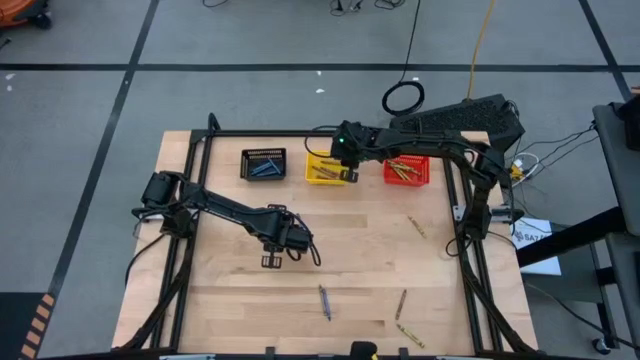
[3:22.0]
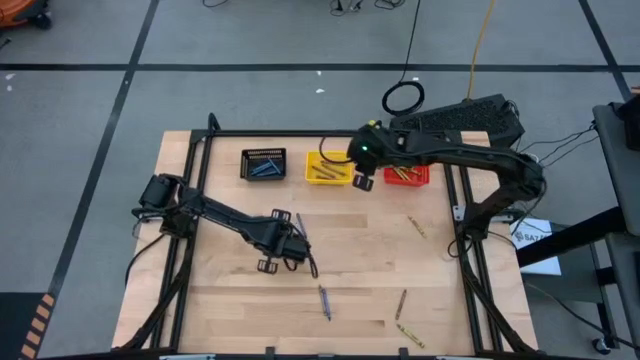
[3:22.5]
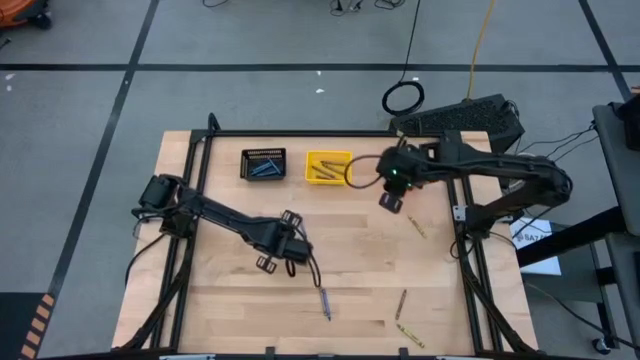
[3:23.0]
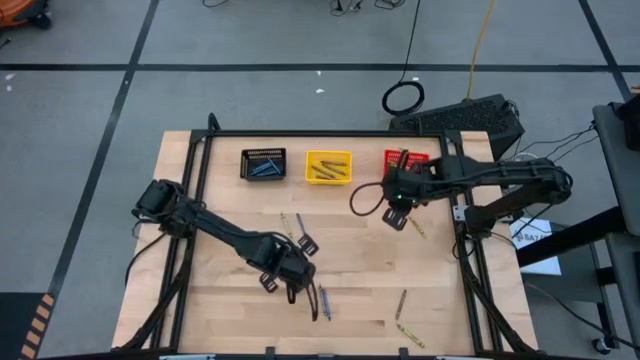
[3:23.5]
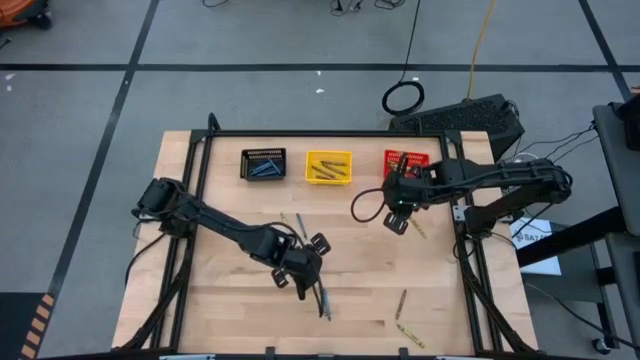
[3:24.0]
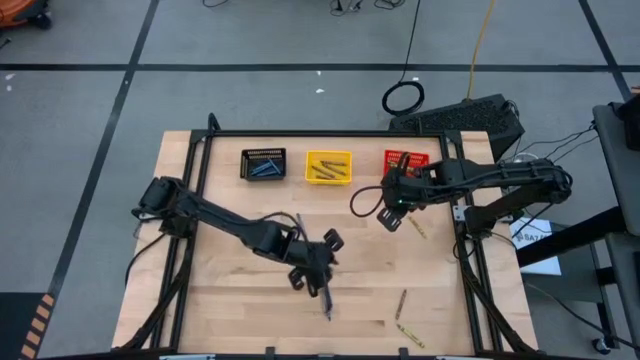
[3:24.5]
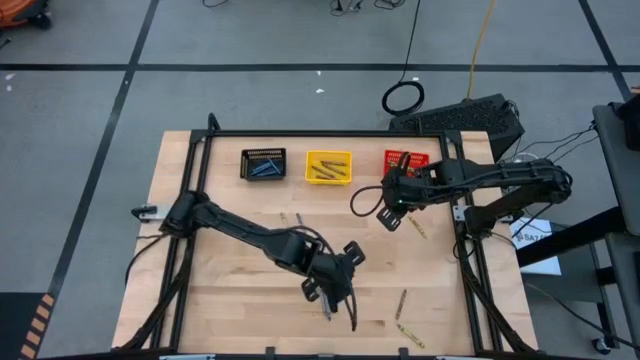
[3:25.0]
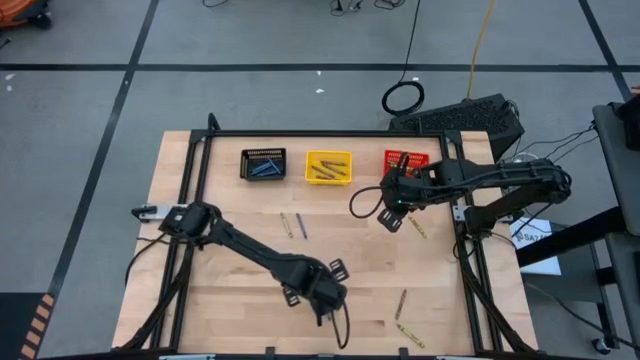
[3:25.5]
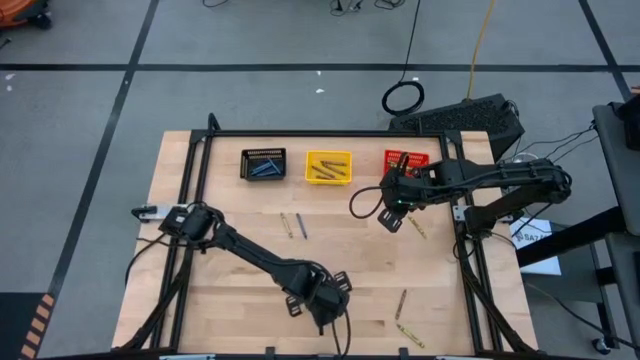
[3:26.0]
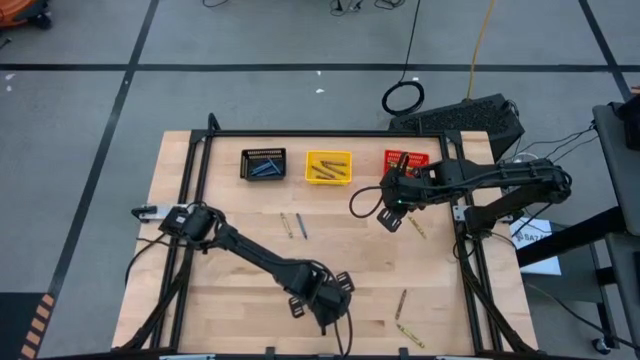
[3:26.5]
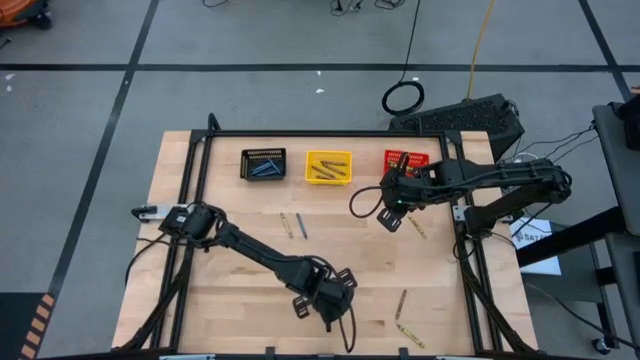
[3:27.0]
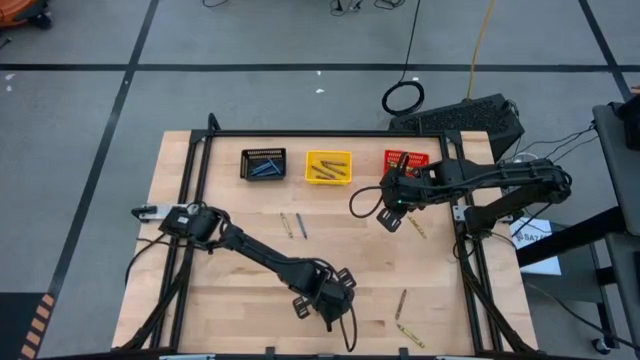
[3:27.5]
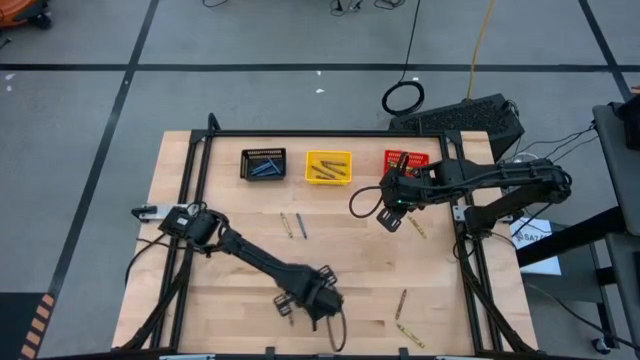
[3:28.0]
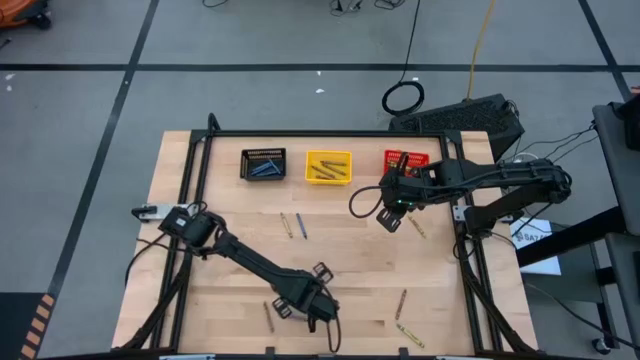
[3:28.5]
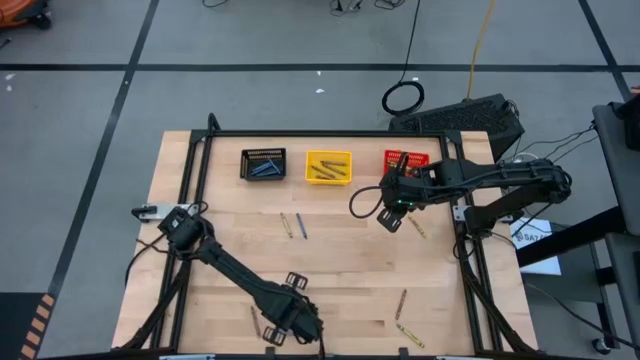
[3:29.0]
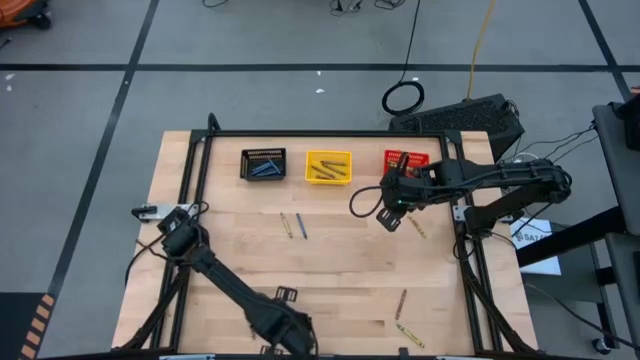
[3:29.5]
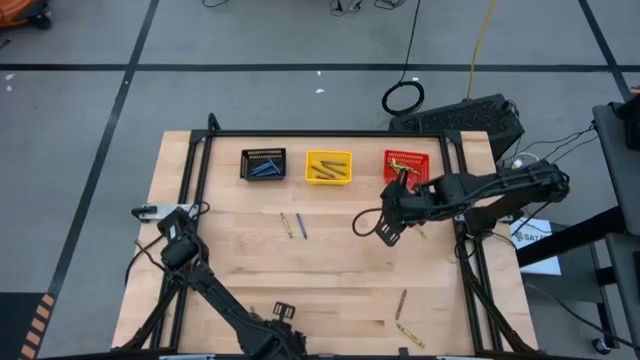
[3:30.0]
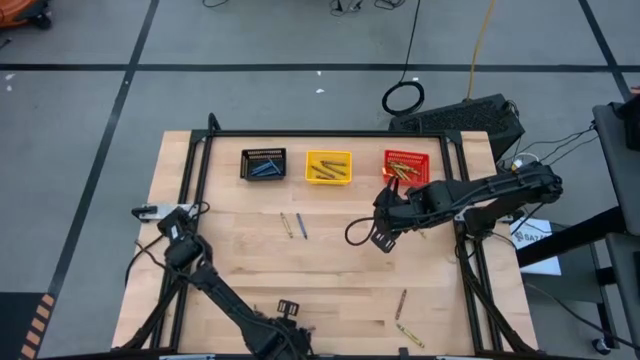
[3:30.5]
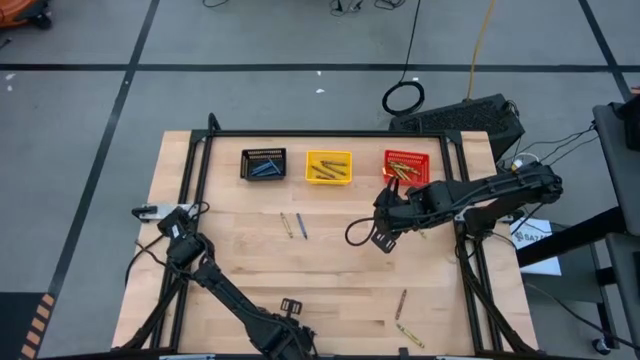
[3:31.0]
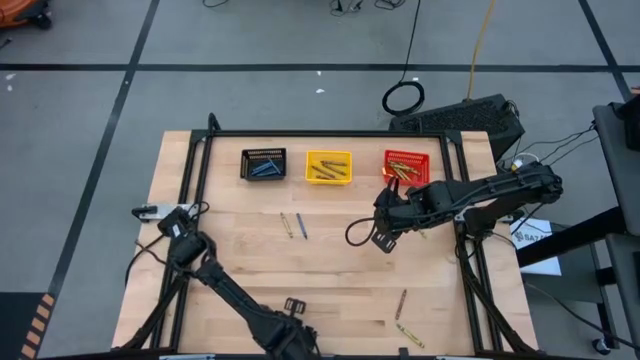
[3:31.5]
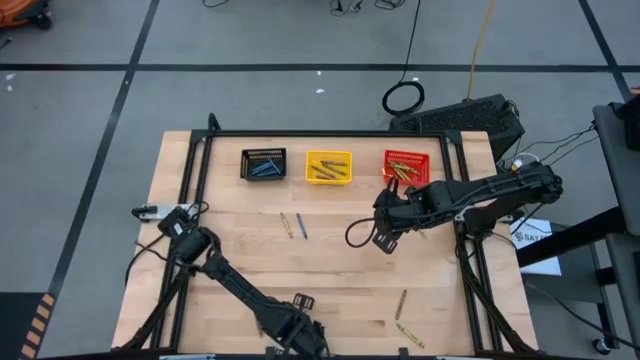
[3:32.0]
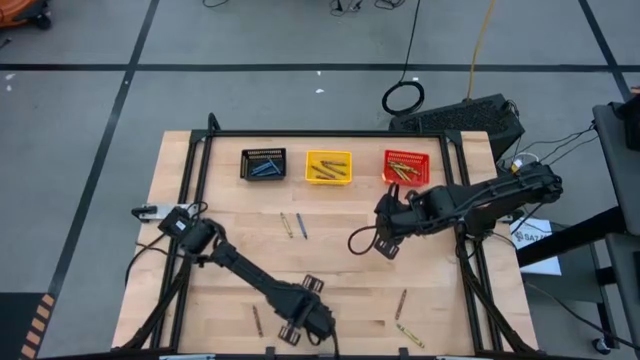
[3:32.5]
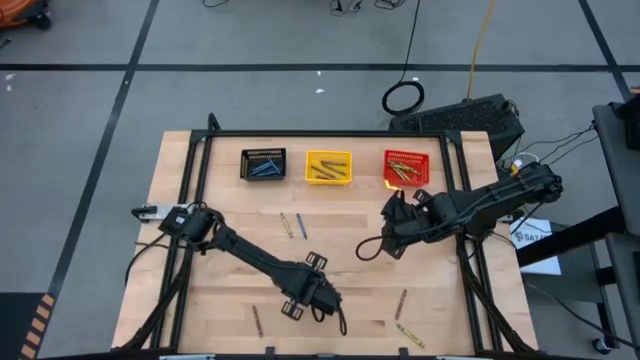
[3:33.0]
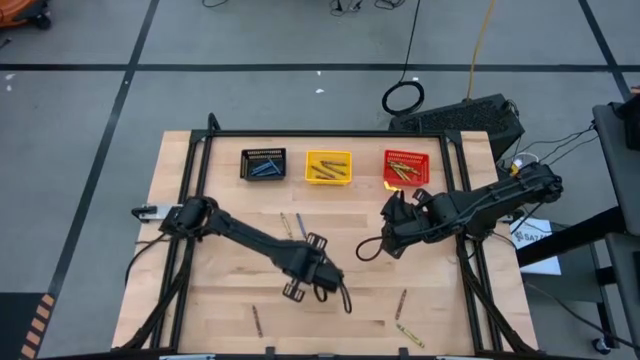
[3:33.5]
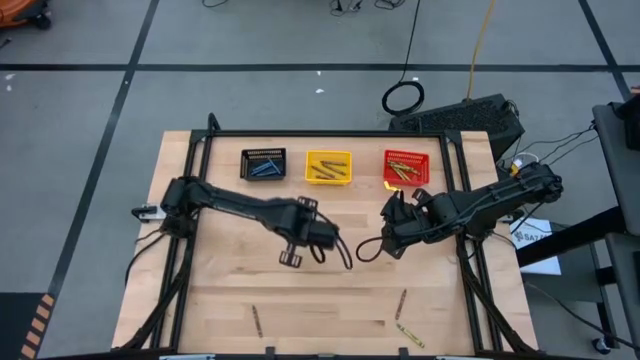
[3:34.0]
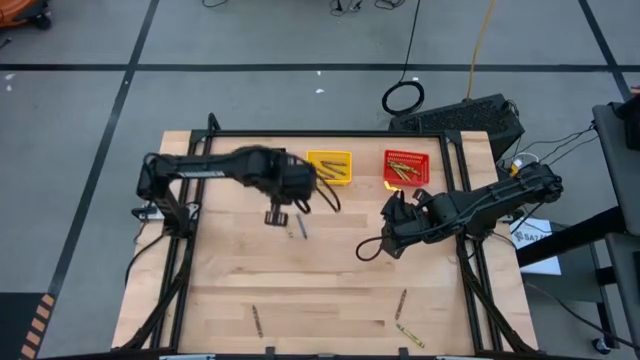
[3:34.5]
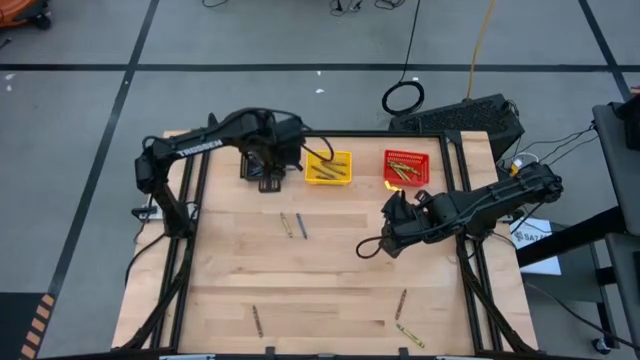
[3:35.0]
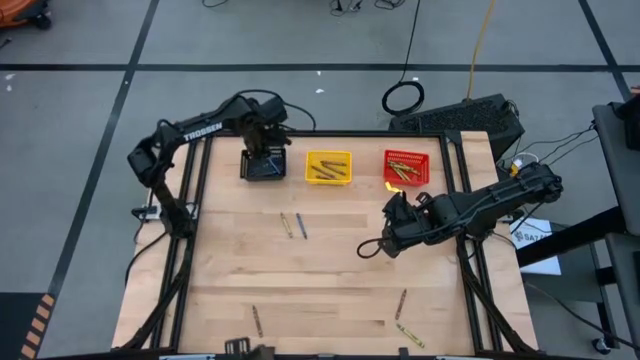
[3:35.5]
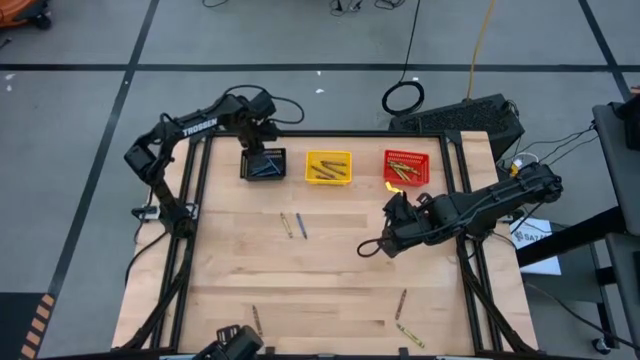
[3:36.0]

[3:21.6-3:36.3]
Task: Sort crayons
Put the blue crayon into the black bin

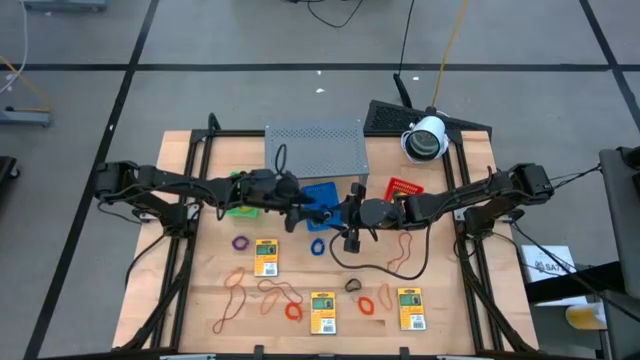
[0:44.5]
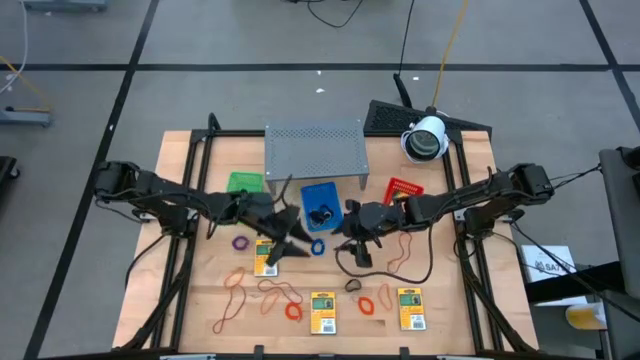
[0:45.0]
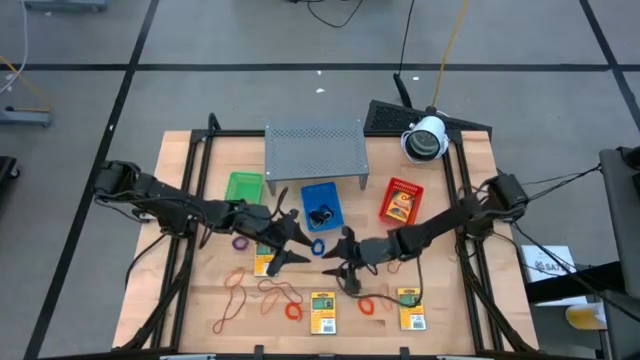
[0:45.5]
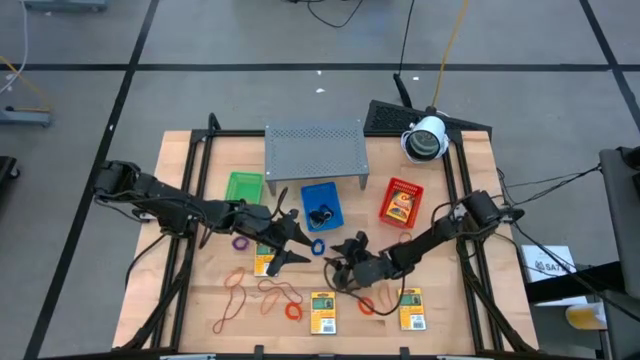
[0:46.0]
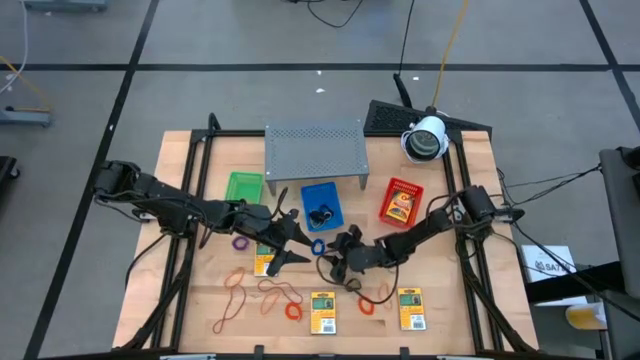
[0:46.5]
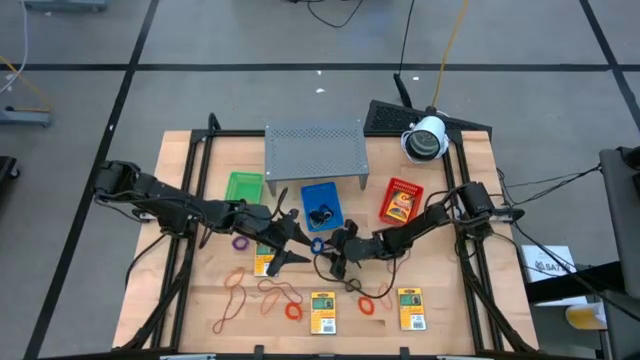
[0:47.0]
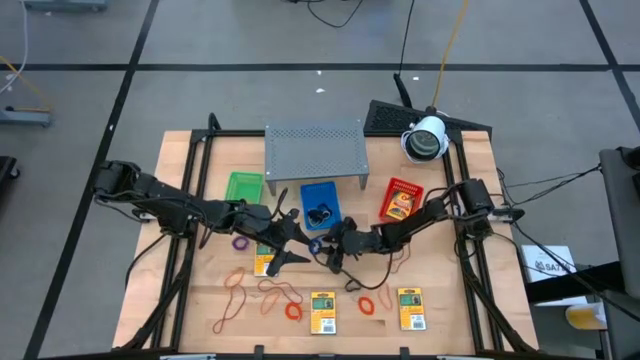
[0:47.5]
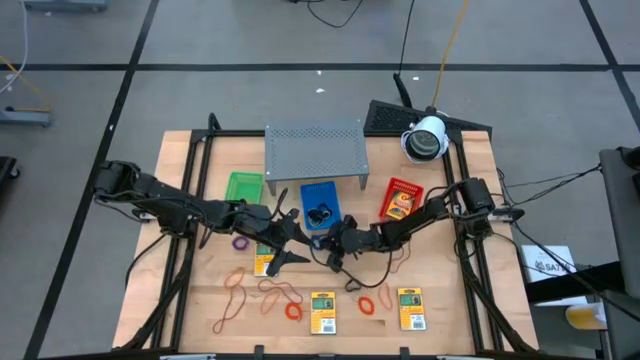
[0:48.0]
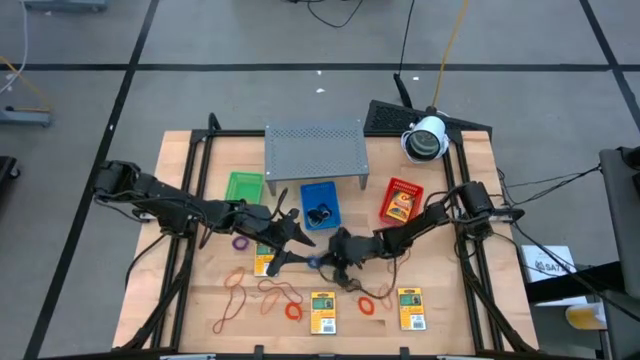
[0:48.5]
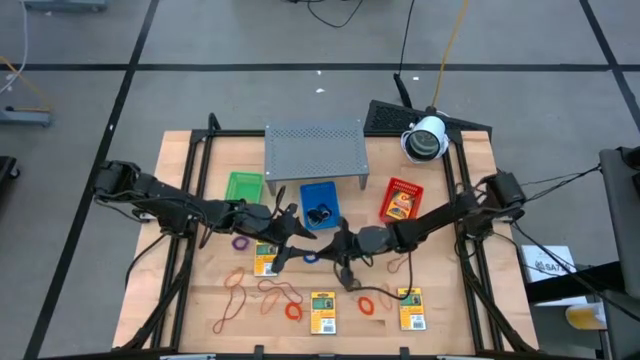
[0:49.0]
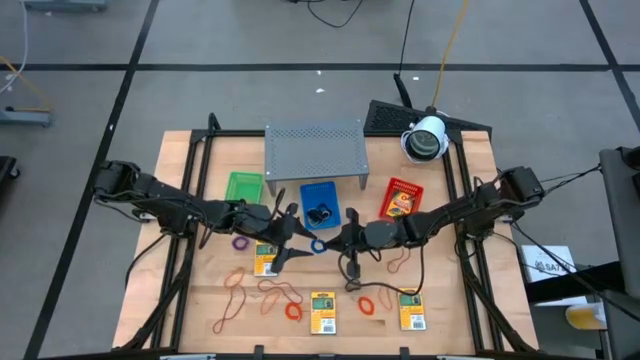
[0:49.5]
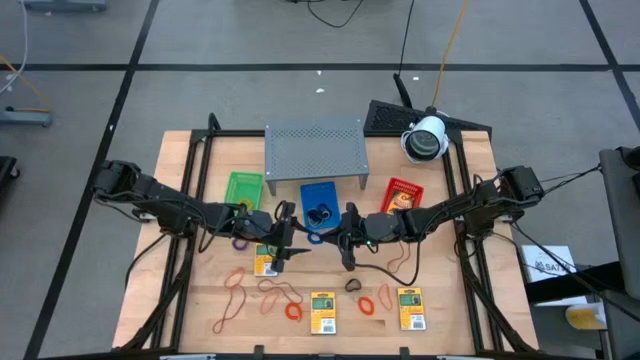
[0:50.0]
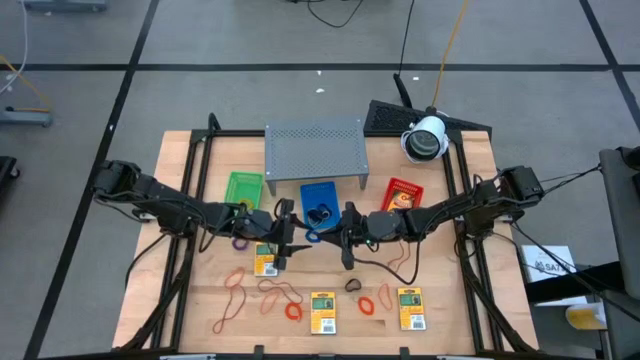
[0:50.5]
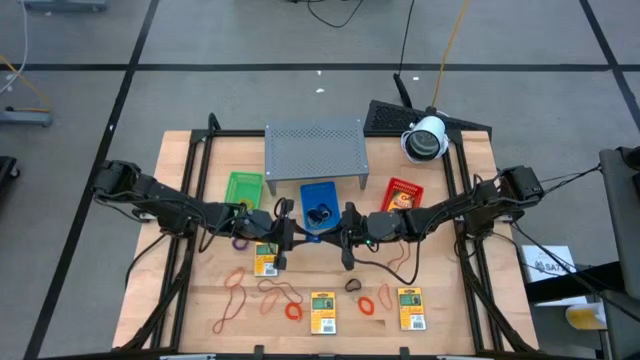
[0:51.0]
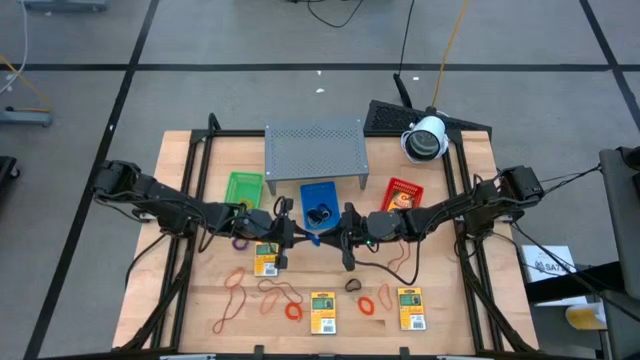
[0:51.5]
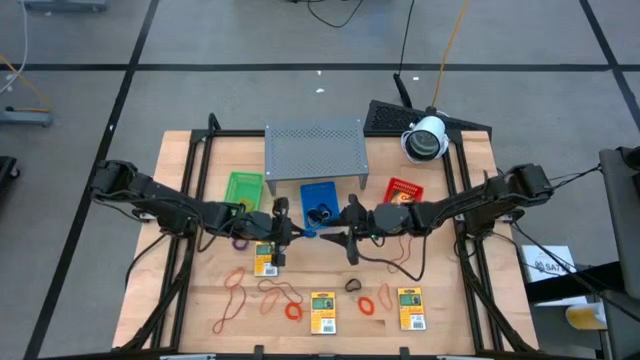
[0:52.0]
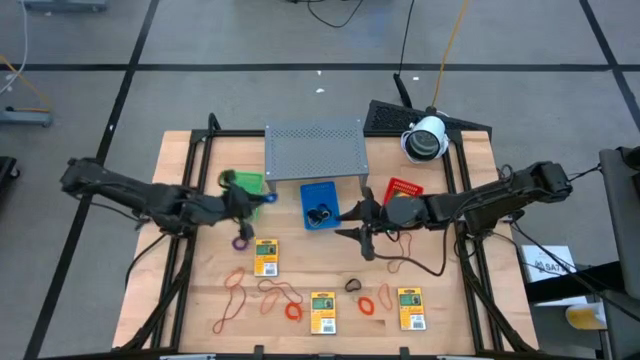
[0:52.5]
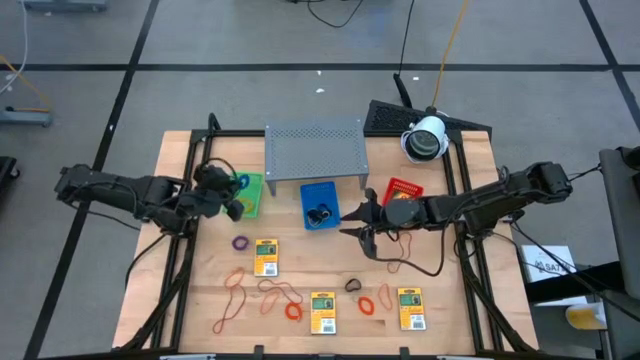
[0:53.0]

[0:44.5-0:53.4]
Task: Pick & Place Office Desk Supplies
Put the blue spring keychain into the green bin
